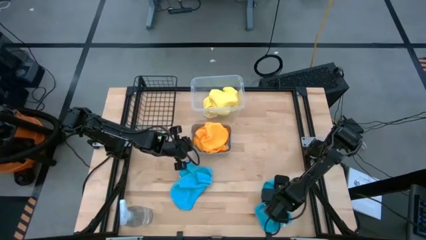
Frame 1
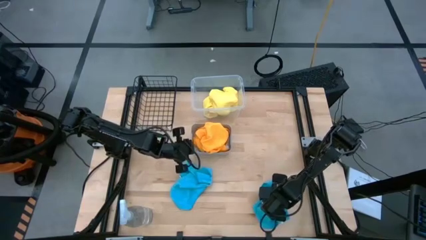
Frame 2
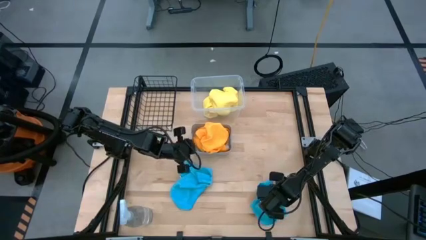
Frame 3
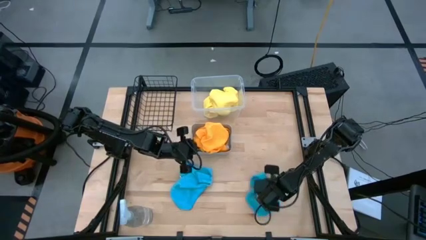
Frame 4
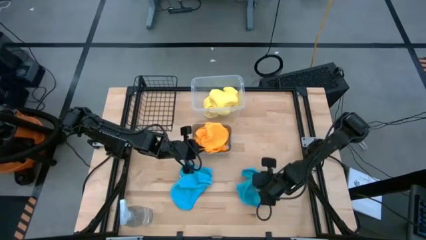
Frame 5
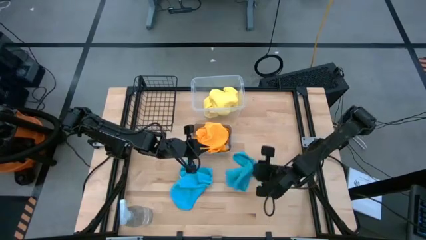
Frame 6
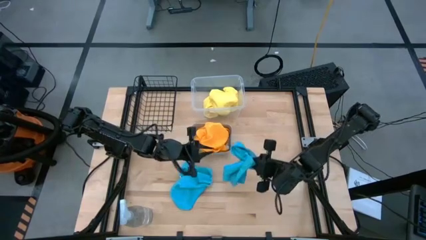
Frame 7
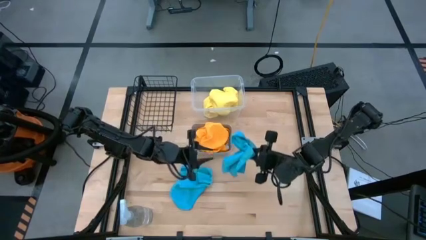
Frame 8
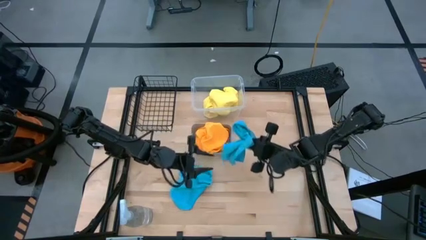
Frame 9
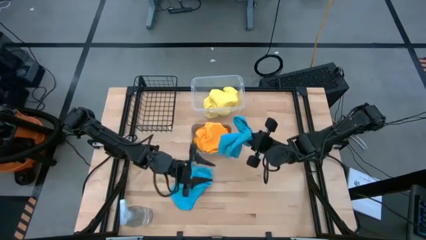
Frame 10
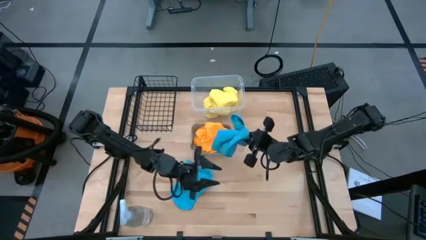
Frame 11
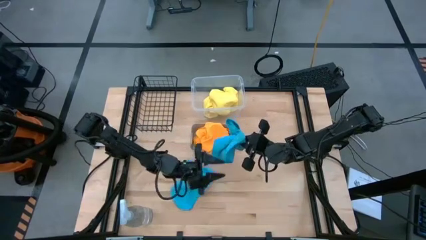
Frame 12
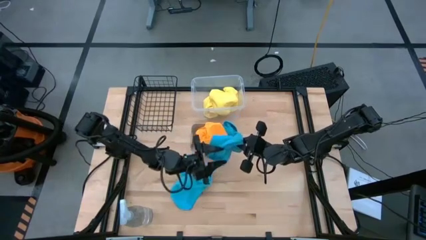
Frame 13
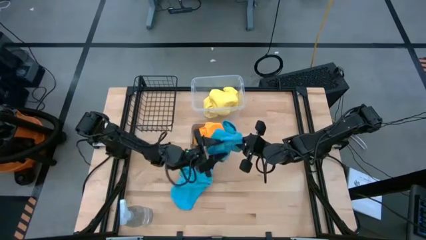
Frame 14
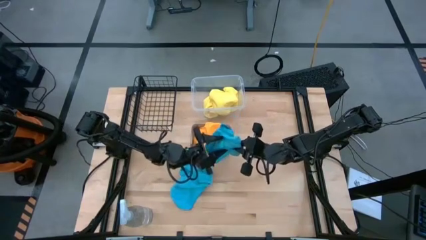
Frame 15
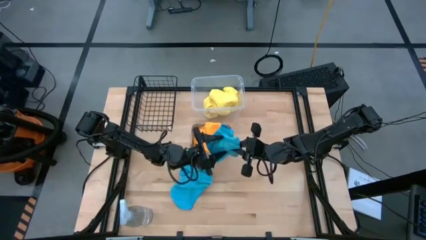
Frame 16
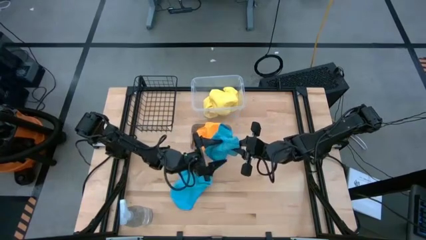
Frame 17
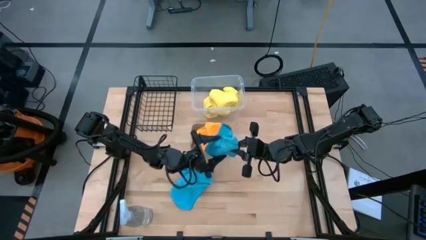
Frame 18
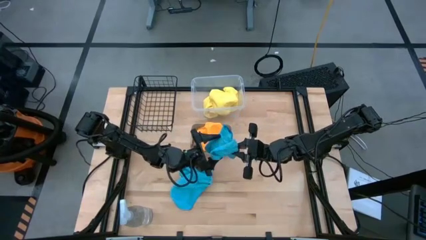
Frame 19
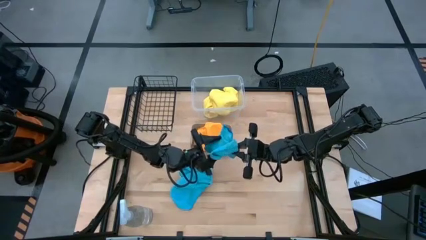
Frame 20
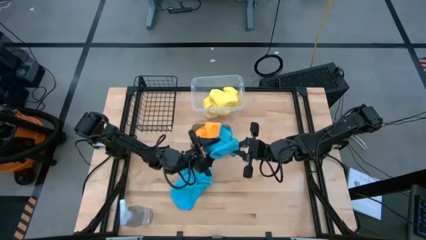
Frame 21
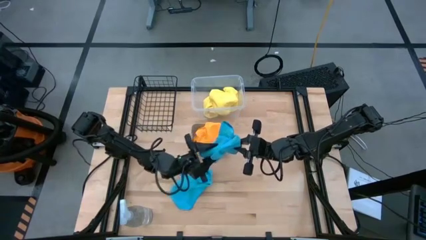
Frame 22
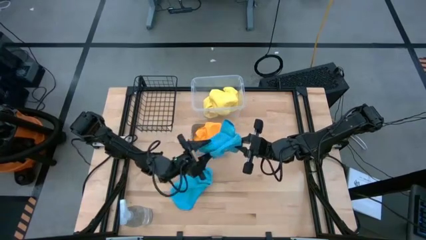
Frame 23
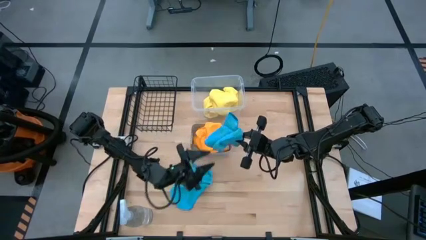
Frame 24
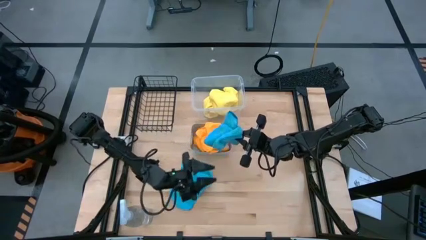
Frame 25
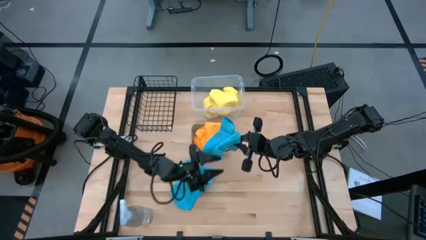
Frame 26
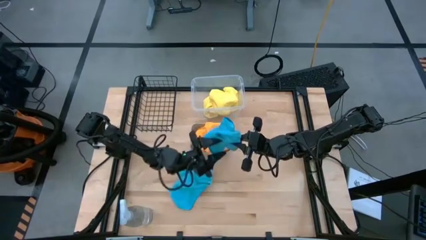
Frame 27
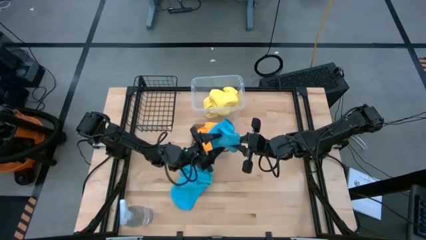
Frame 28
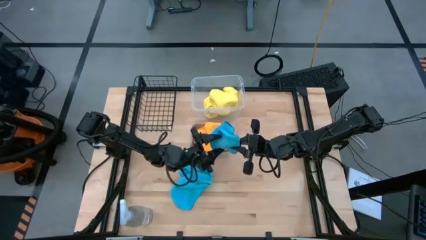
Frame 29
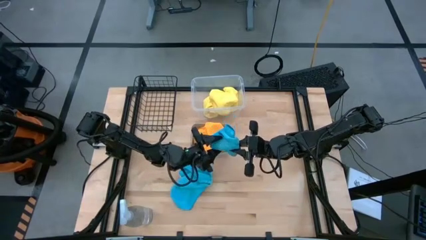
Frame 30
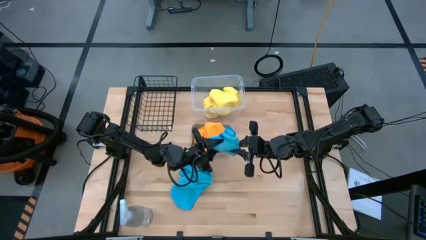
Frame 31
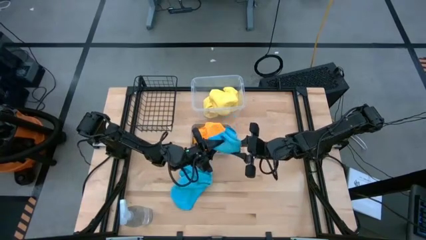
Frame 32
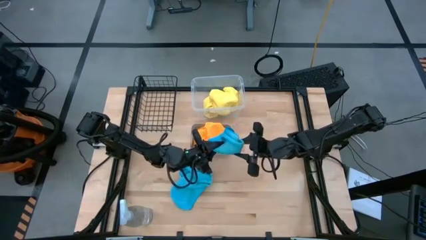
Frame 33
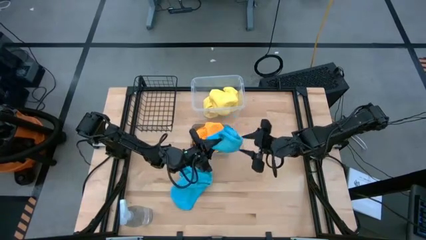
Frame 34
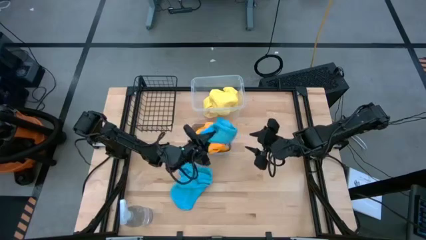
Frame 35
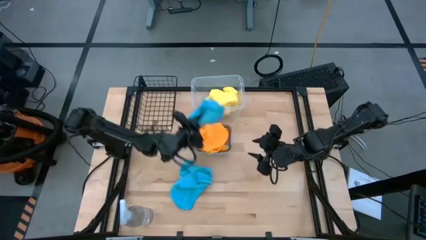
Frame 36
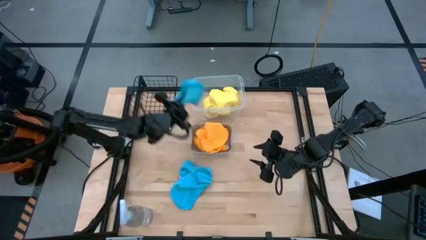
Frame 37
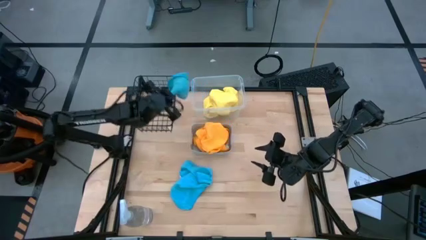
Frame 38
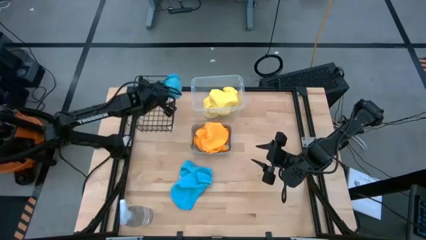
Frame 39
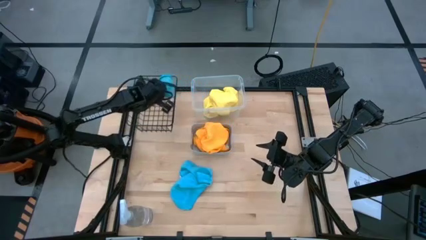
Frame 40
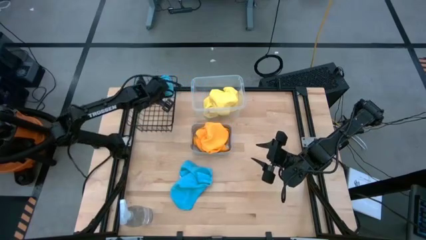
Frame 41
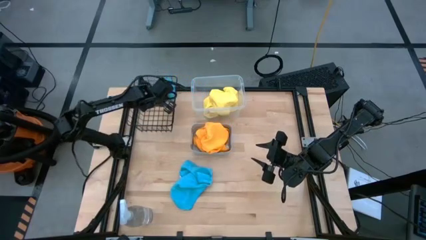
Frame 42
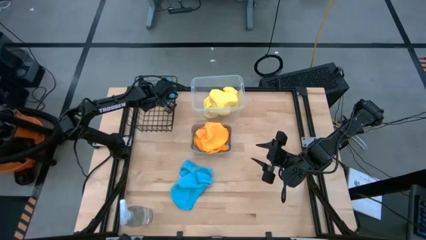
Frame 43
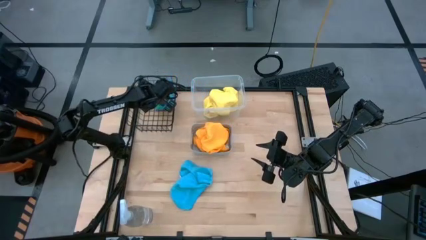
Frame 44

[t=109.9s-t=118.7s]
Task: Sort microfiber towel by color & place in baskets
Put the right blue microfiber cloth into the black wire basket

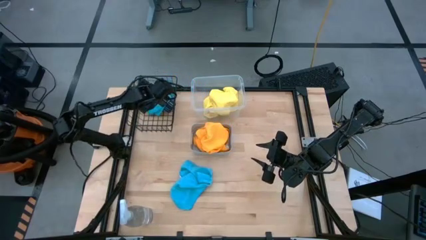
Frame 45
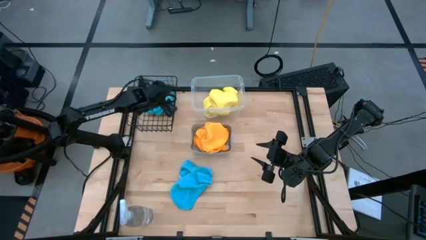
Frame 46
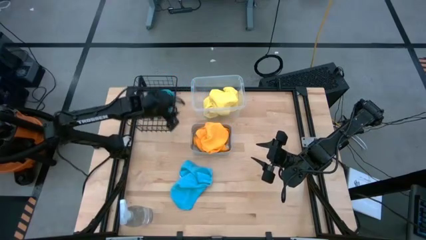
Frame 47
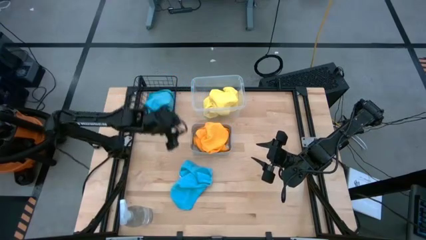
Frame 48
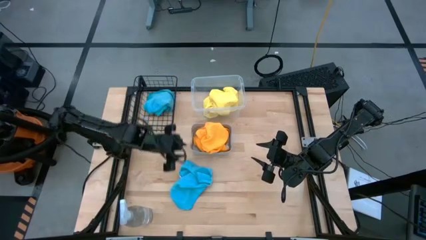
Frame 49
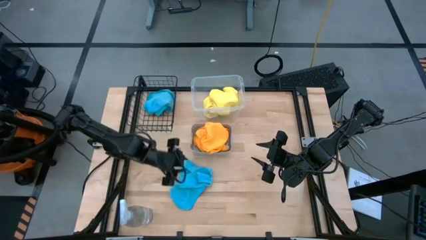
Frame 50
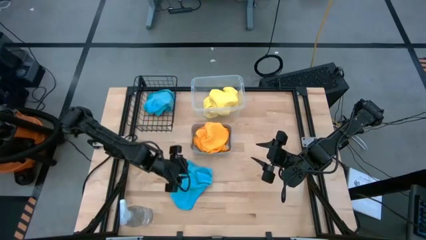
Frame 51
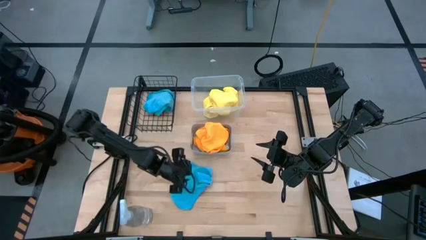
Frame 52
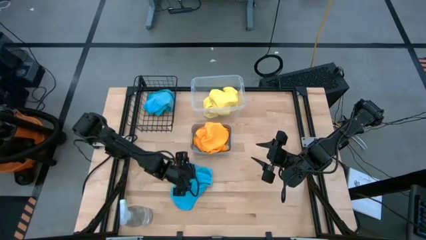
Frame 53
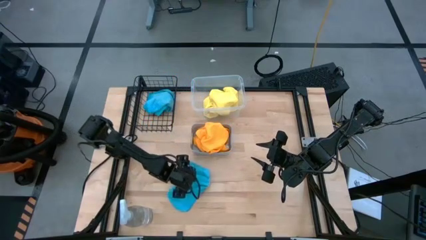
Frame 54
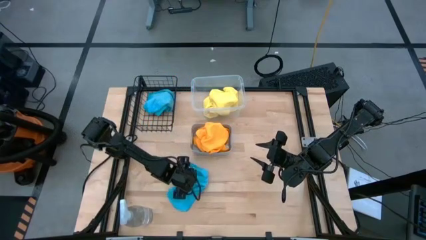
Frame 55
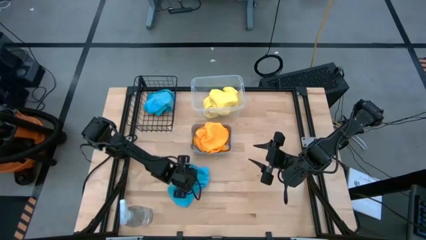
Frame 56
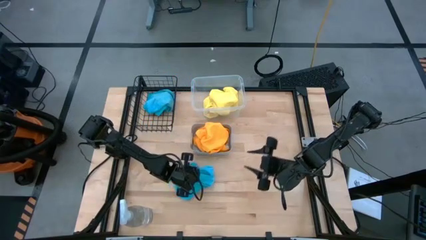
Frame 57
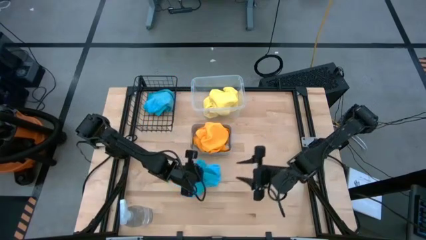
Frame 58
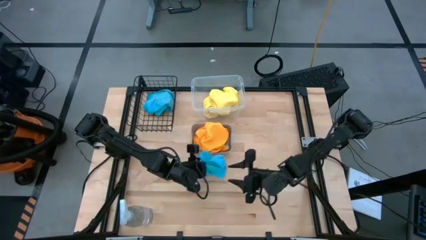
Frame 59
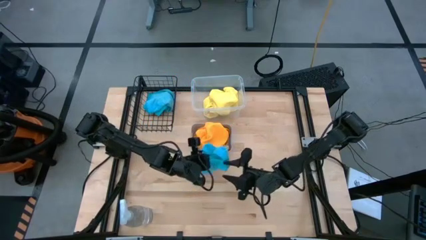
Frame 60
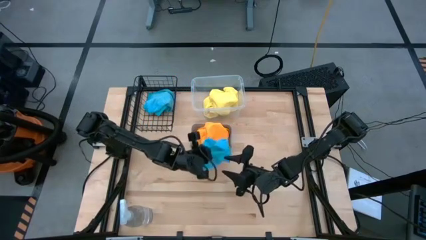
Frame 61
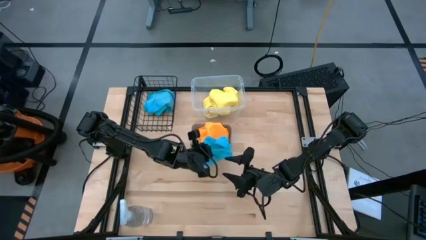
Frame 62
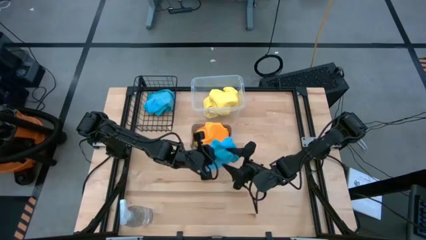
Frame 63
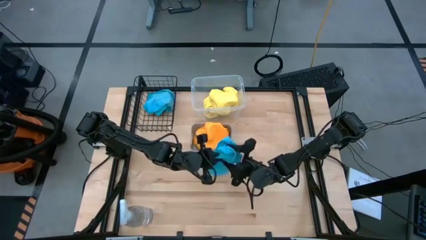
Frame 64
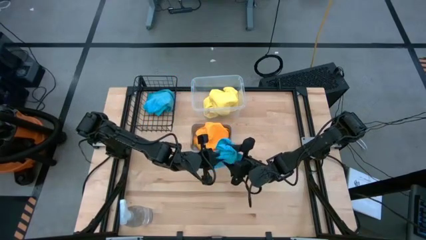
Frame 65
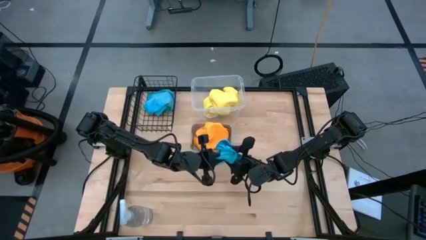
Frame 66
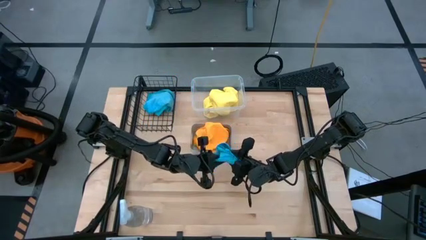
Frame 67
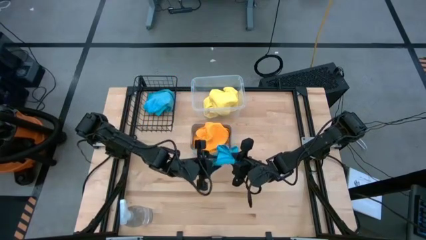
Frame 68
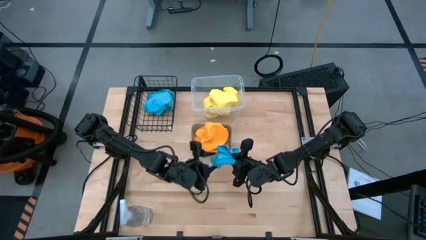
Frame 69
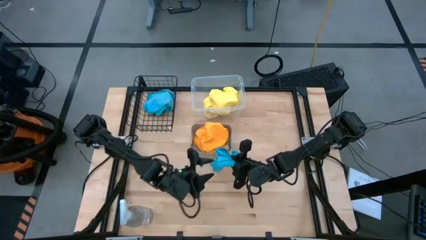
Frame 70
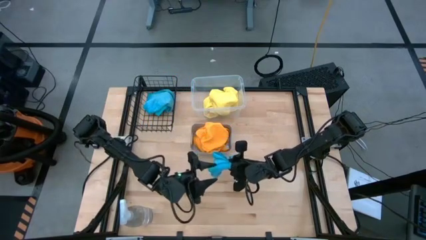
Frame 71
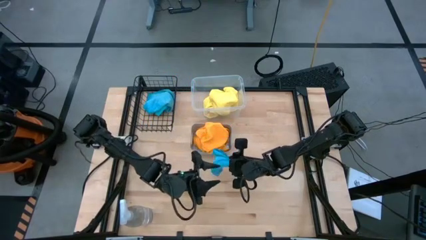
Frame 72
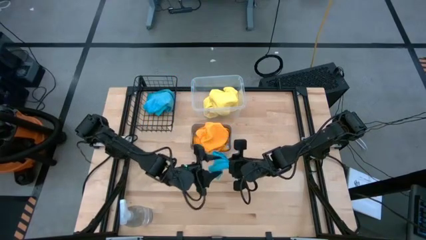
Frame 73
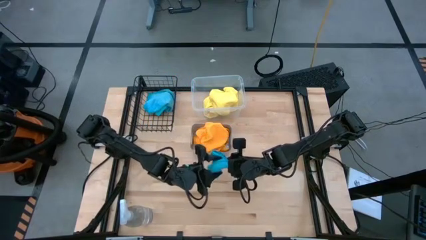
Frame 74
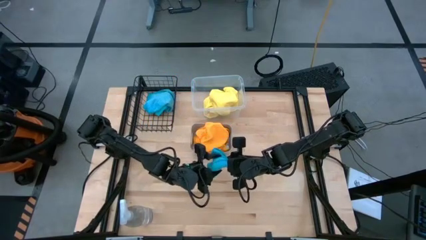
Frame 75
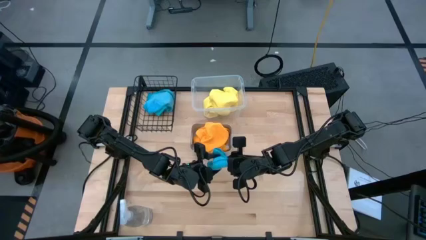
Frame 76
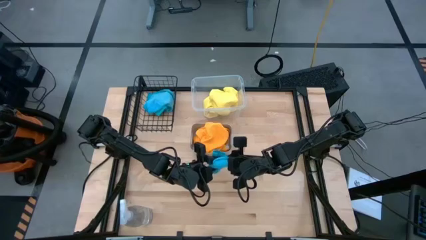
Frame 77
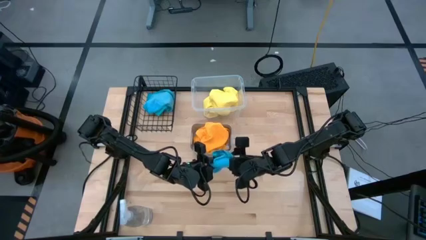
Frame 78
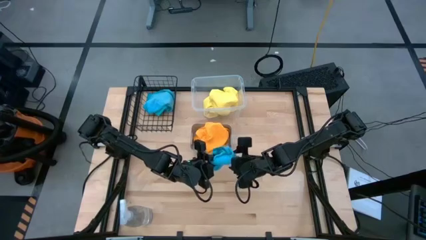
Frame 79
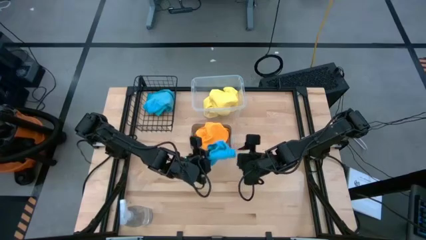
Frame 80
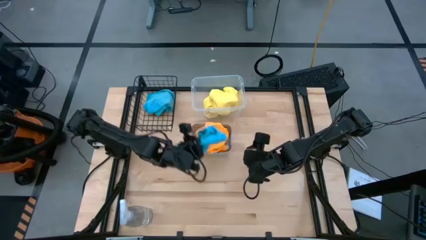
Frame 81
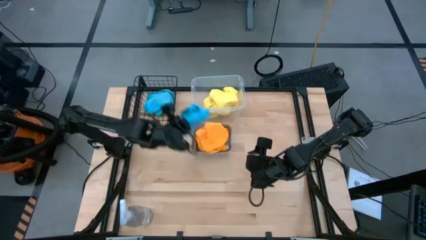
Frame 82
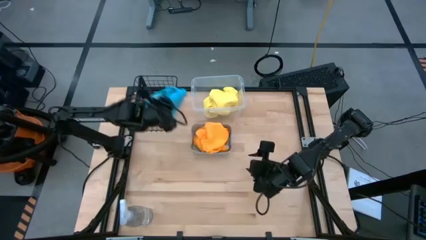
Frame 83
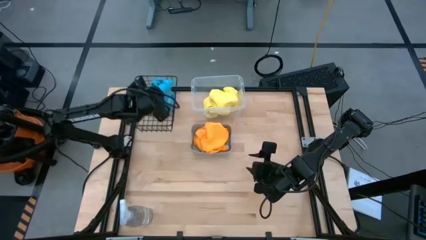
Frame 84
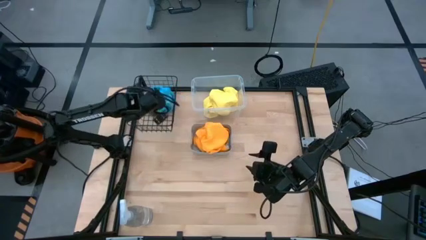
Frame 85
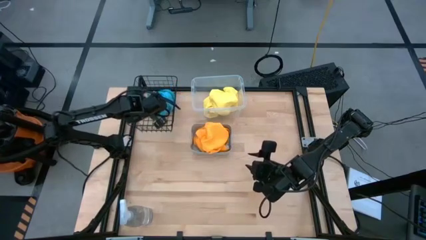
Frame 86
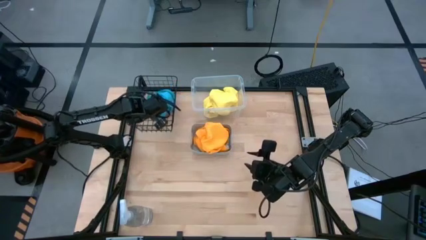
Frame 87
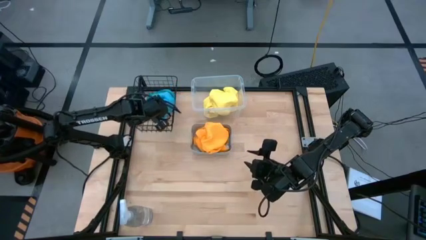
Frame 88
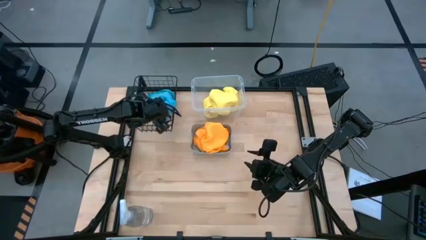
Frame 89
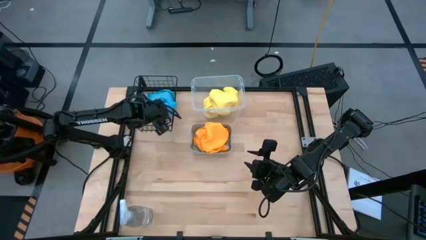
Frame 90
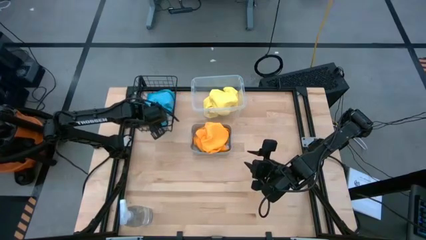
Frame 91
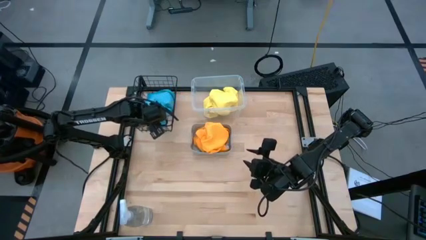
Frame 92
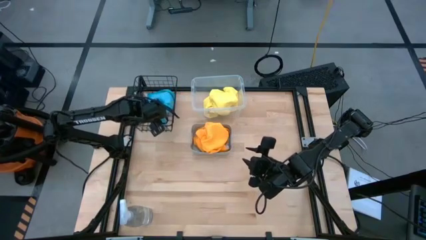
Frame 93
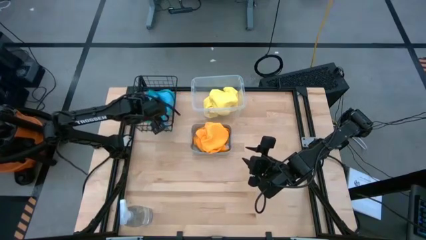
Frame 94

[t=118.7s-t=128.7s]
Put the blue microfiber cloth into the black wire basket
